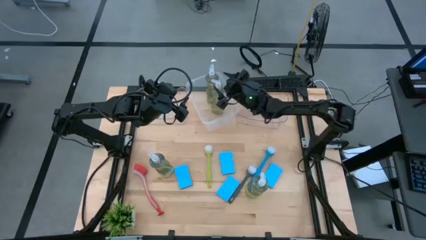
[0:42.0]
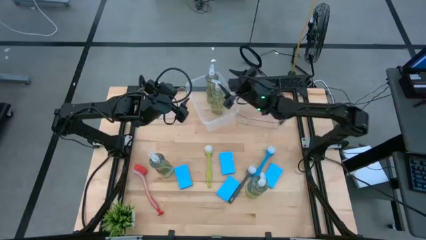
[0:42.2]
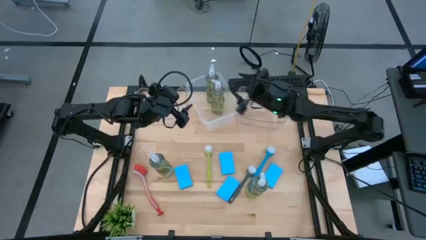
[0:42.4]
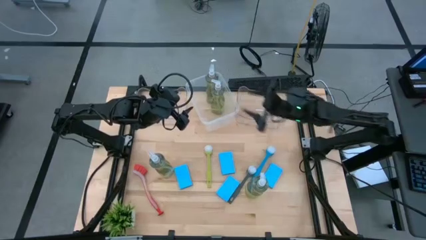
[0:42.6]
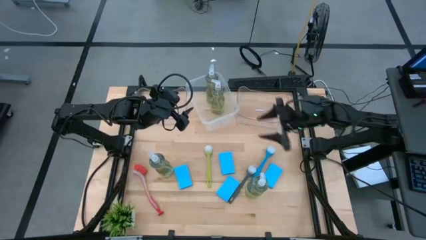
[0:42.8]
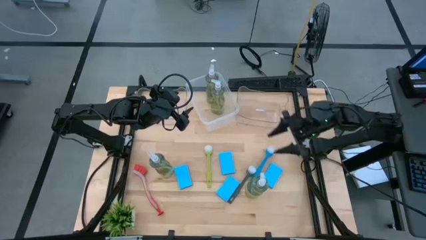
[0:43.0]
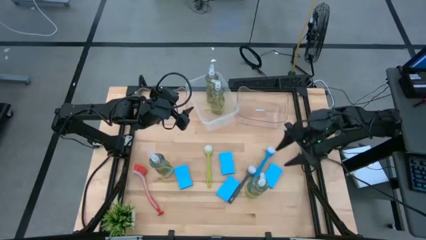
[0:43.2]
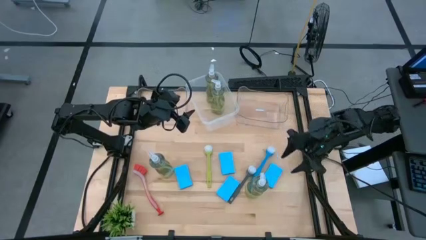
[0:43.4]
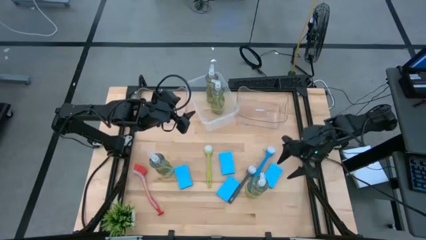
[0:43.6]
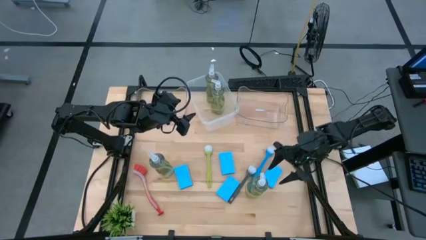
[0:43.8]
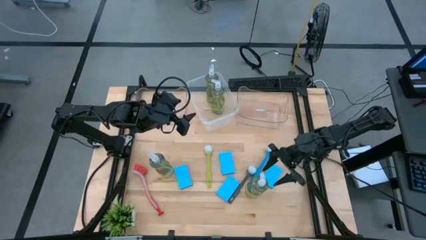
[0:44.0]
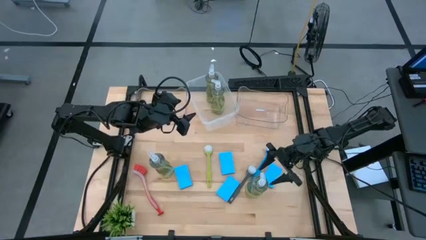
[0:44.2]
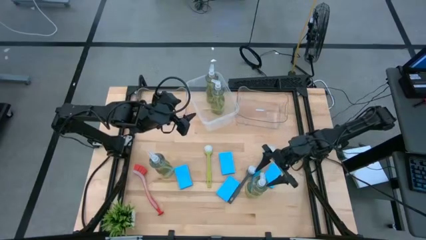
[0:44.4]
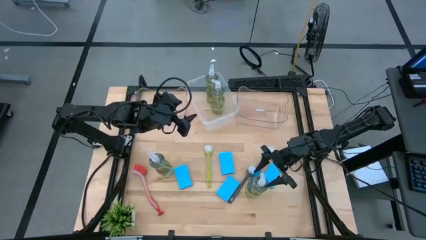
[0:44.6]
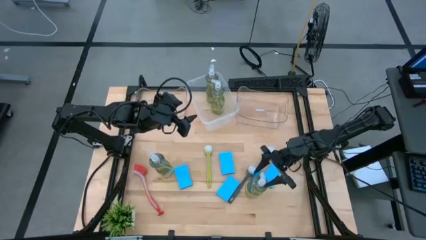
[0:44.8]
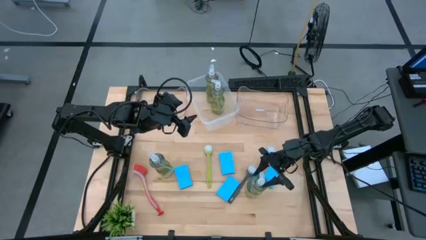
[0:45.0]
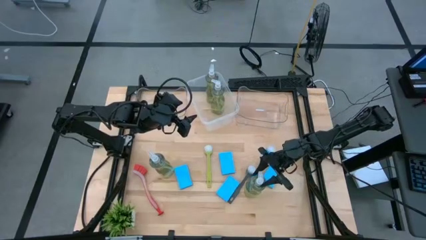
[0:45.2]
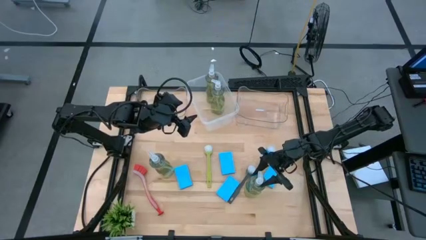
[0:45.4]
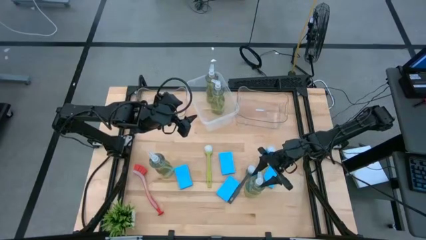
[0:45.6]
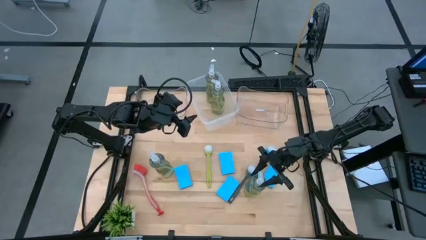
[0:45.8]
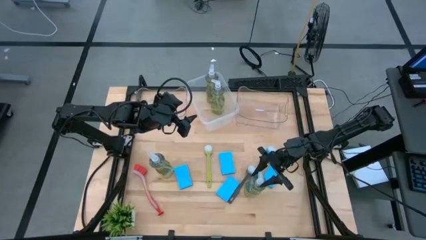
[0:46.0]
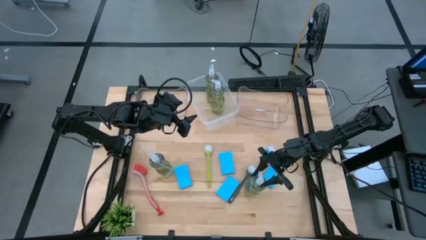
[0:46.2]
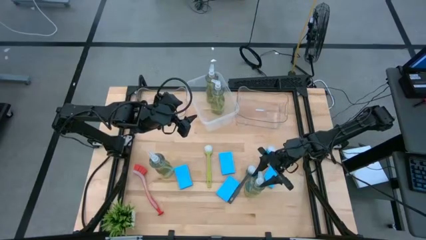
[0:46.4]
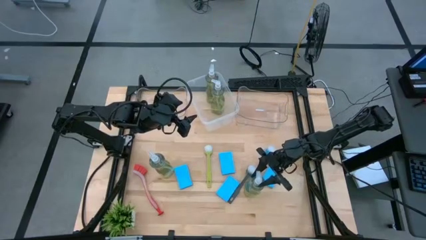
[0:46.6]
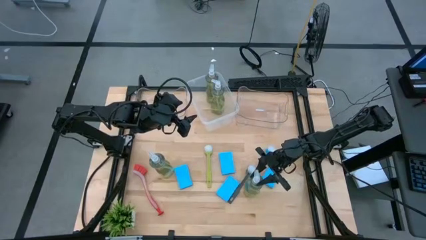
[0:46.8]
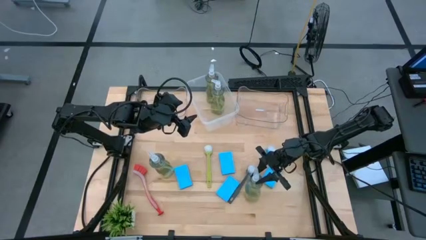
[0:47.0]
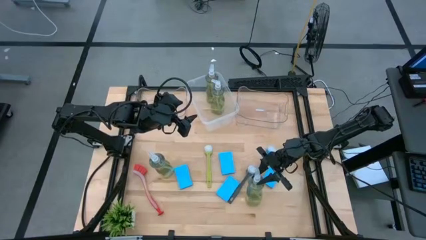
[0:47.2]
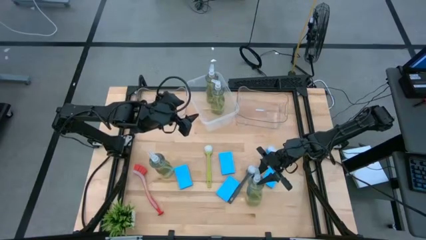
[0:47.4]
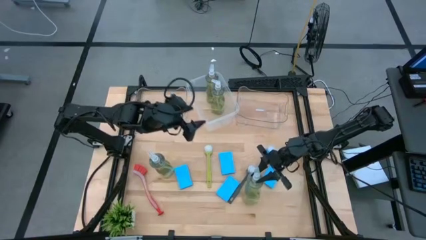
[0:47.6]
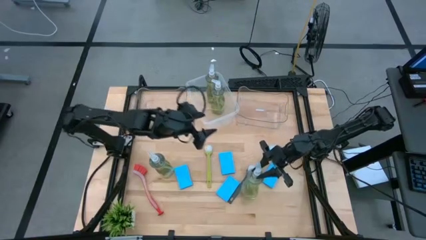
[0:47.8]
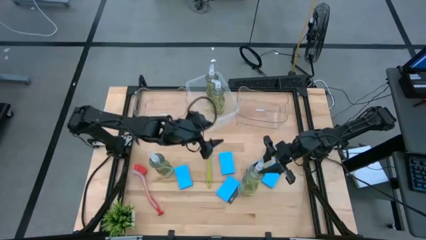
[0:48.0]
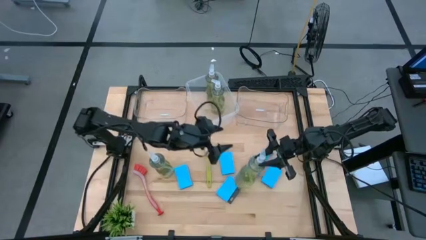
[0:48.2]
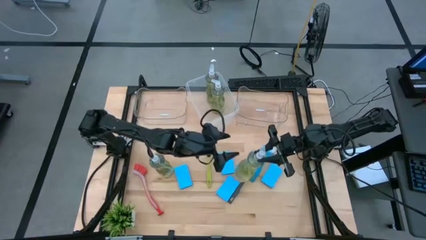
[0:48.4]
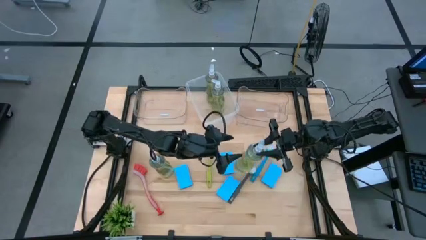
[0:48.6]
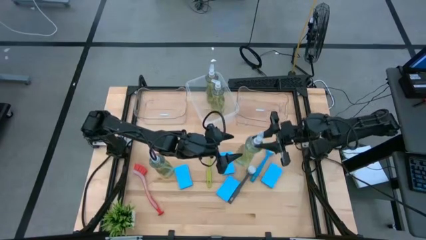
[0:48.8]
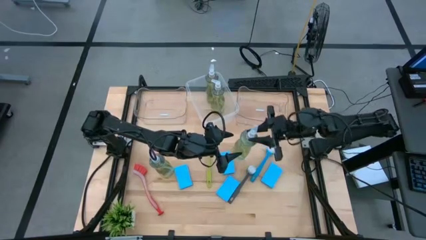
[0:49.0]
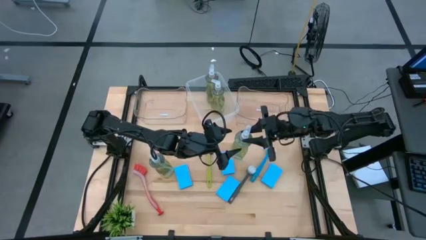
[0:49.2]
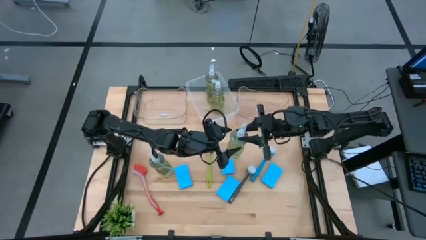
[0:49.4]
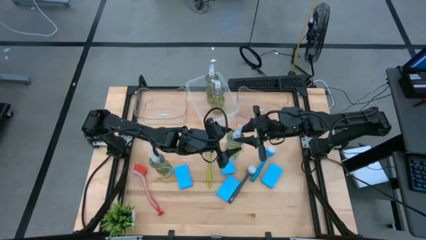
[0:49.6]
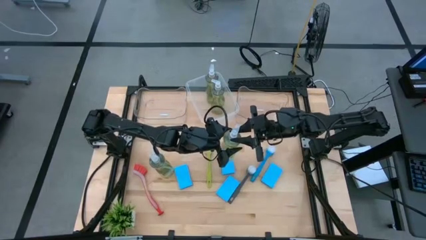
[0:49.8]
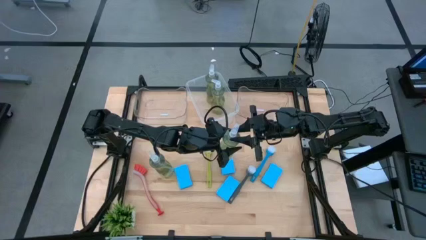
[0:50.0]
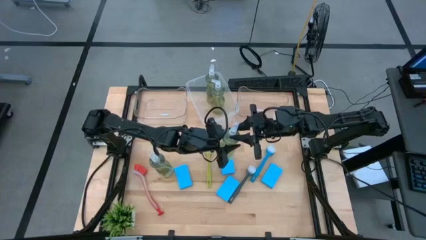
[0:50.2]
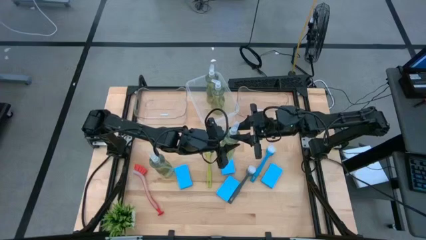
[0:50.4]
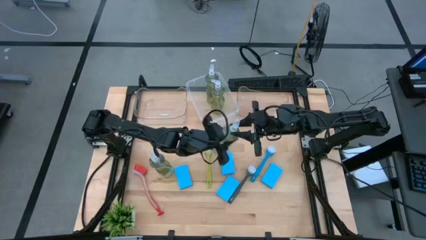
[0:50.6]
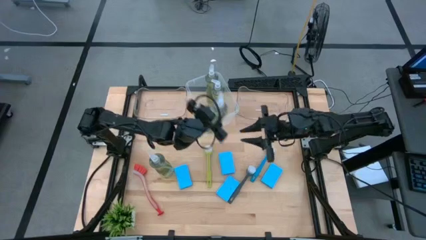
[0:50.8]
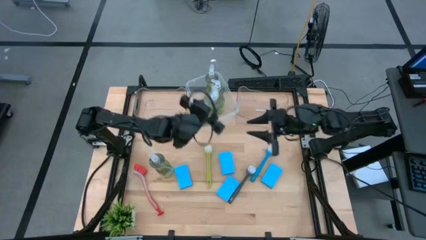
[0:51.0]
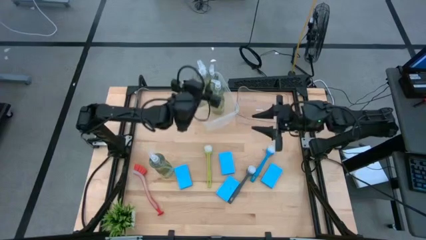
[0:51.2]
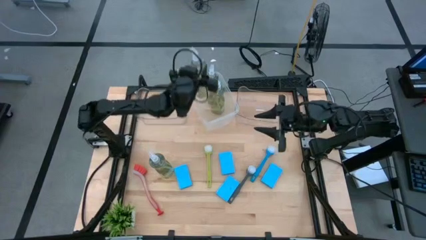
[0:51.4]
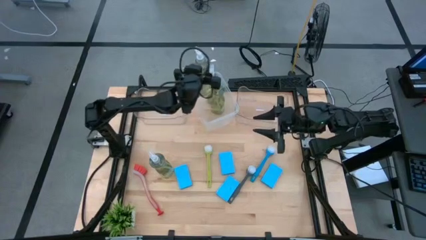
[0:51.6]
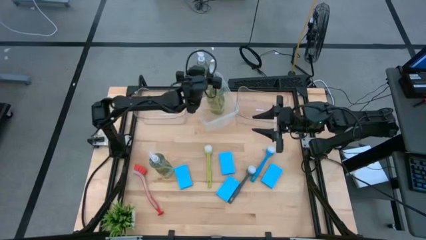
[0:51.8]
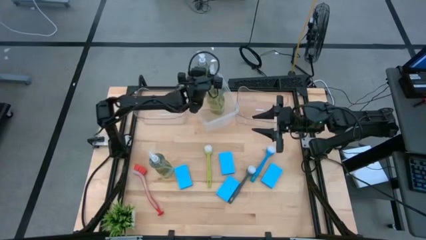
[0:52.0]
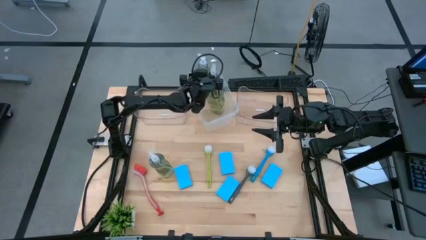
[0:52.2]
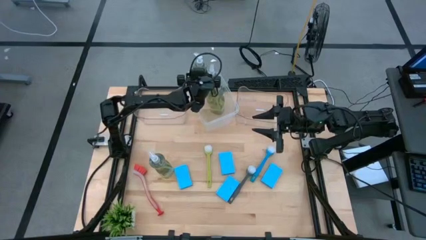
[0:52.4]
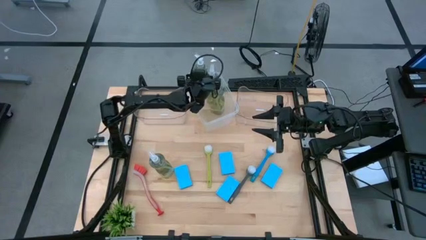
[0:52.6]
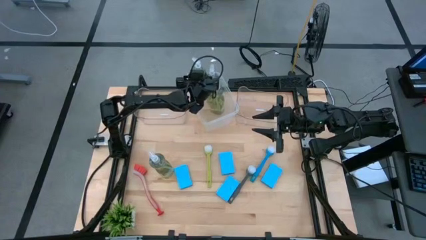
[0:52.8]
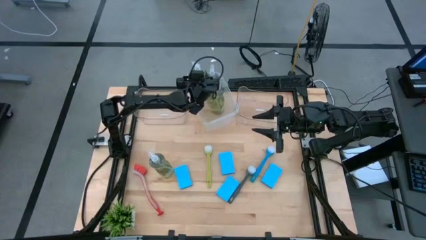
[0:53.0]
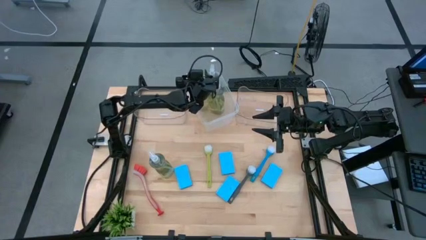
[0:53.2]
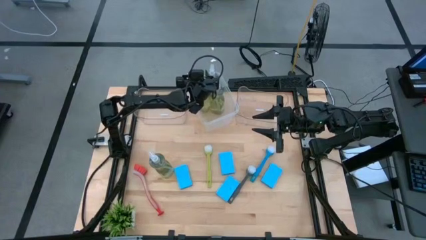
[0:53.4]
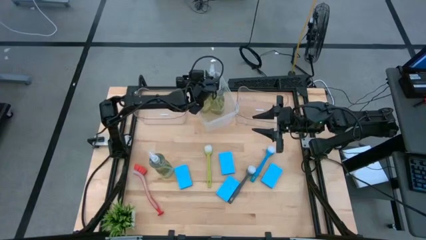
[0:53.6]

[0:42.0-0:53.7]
Task: Pick & Place Kitchen Sink Supplies
Put the liquid dishwashing soap into the middle transparent bin
